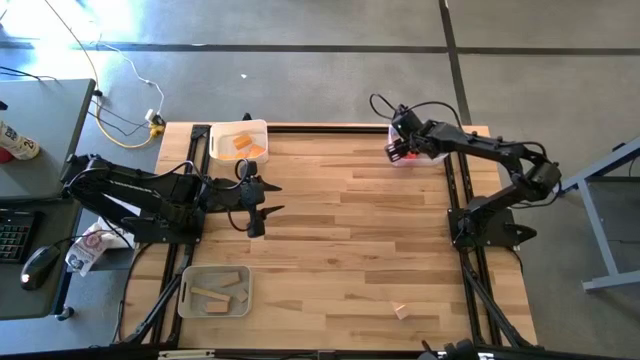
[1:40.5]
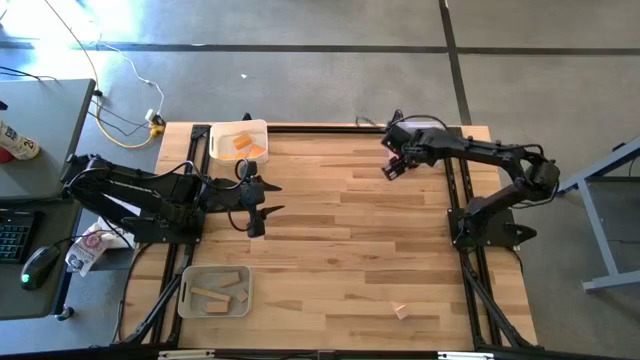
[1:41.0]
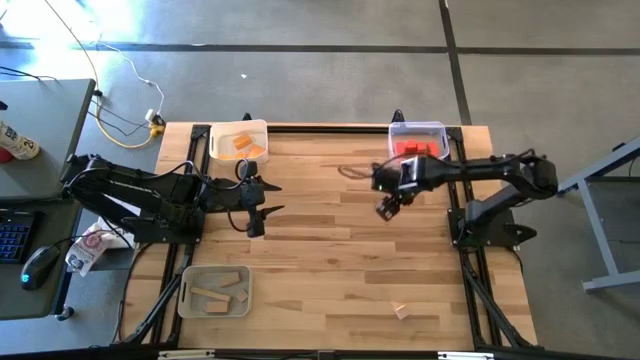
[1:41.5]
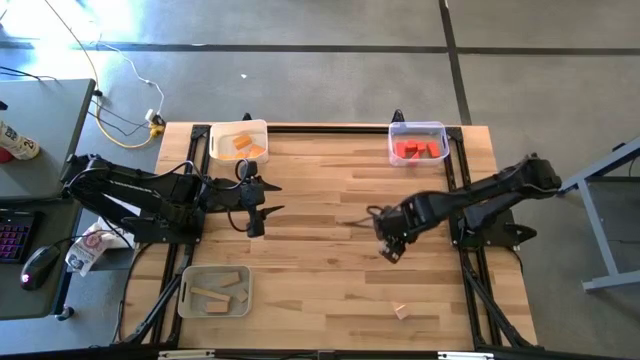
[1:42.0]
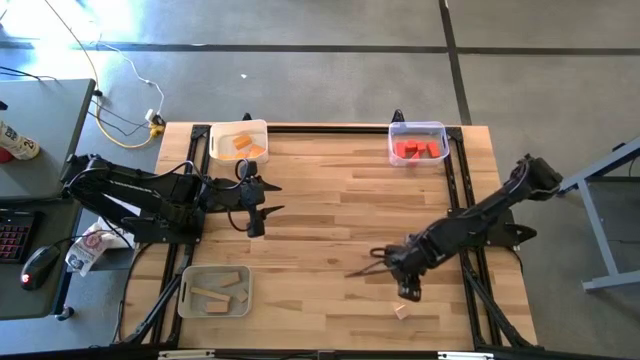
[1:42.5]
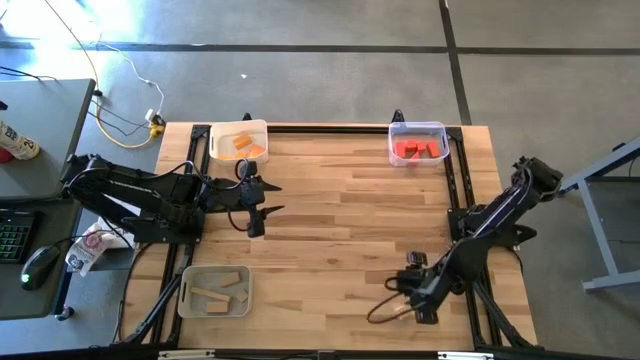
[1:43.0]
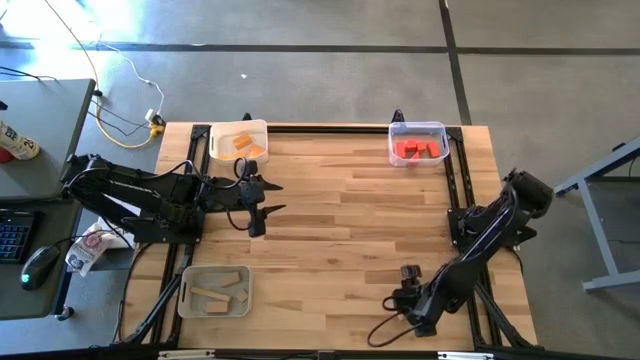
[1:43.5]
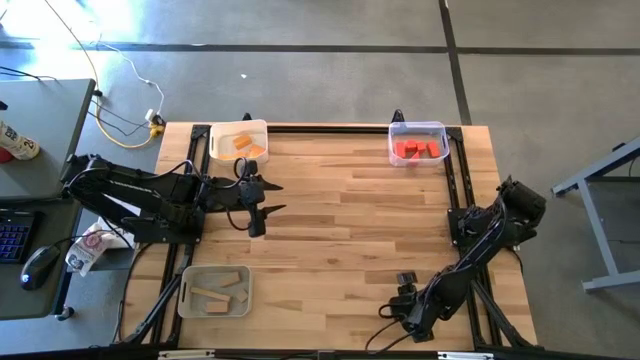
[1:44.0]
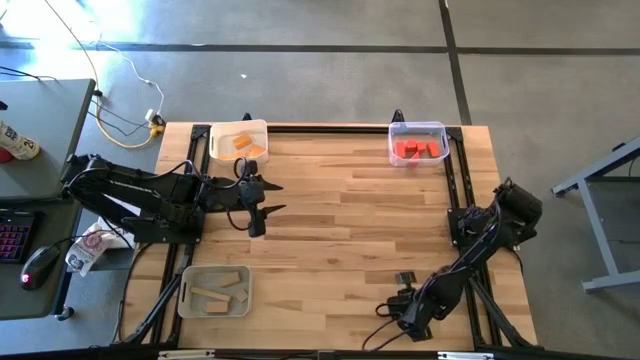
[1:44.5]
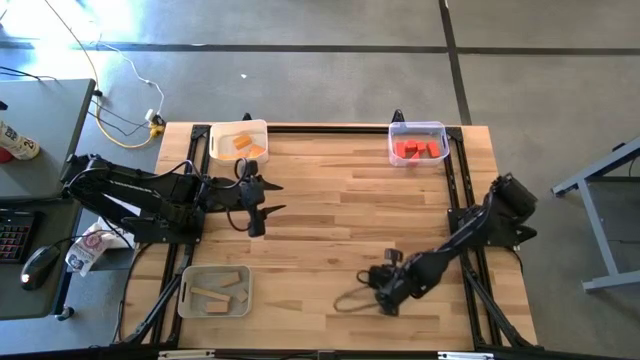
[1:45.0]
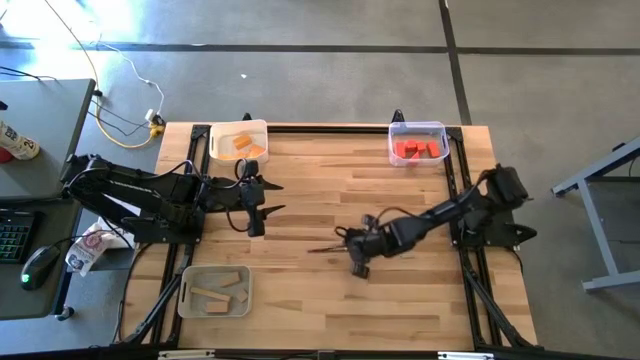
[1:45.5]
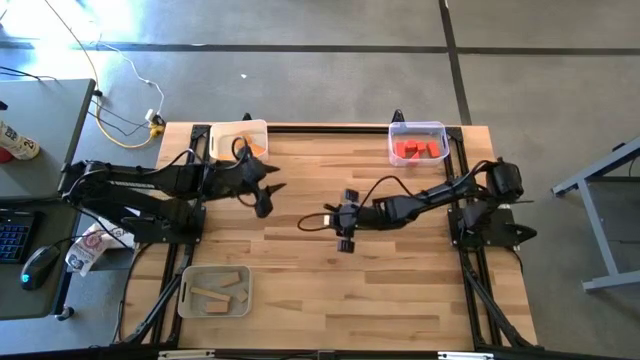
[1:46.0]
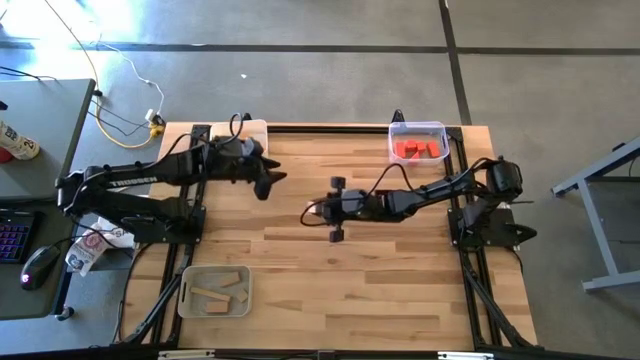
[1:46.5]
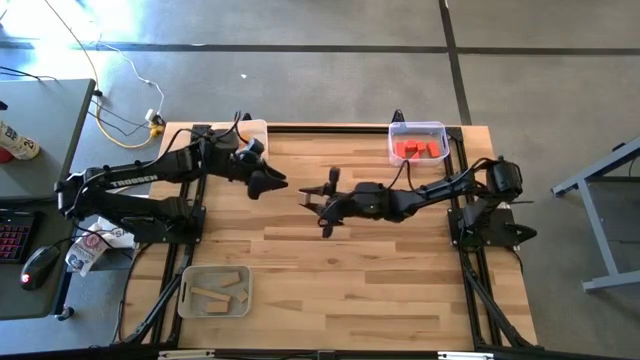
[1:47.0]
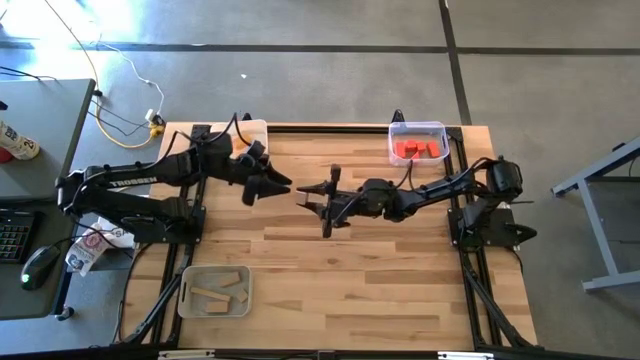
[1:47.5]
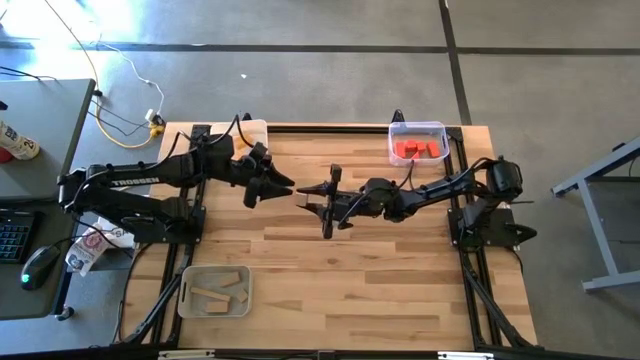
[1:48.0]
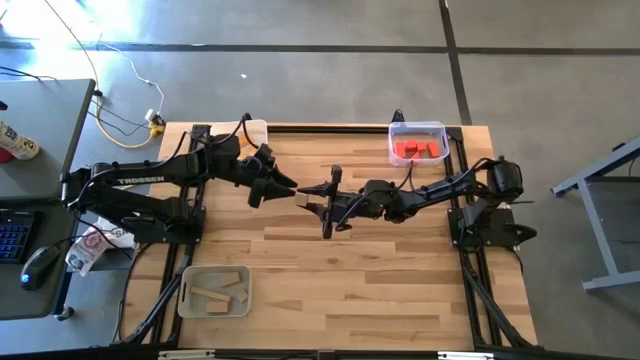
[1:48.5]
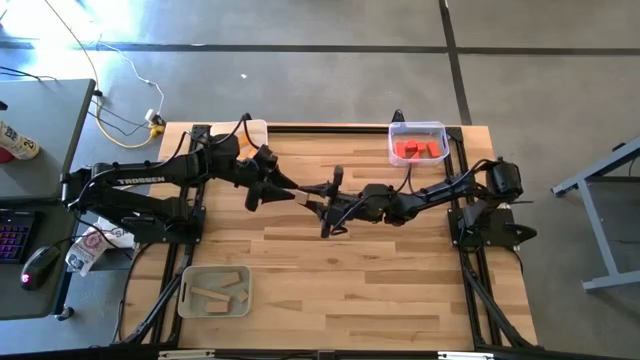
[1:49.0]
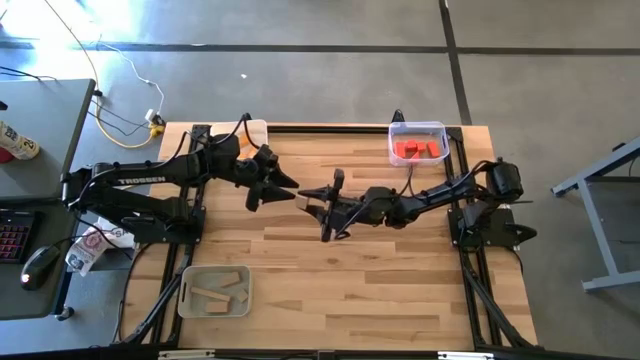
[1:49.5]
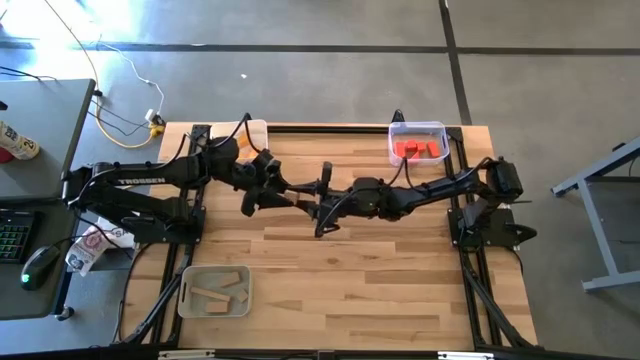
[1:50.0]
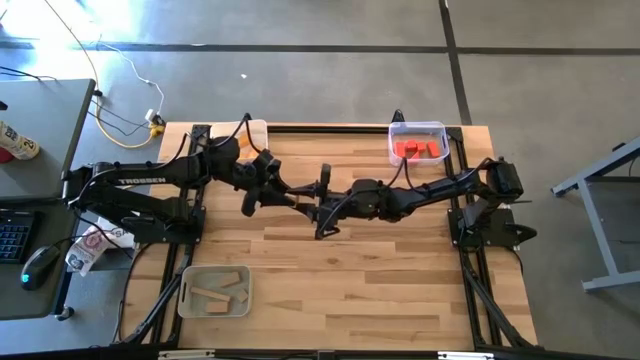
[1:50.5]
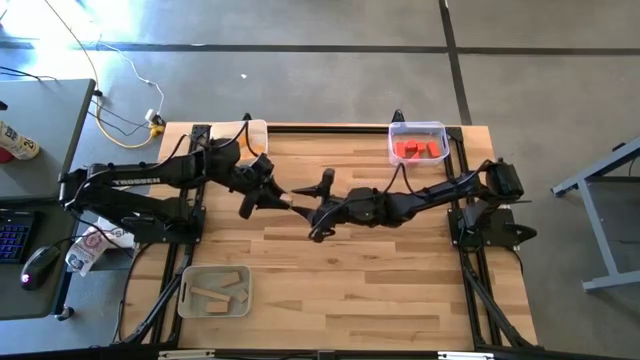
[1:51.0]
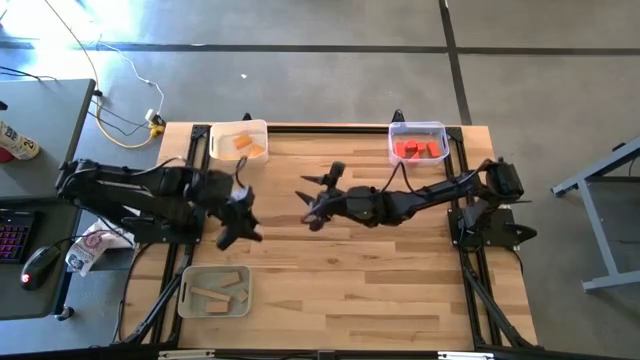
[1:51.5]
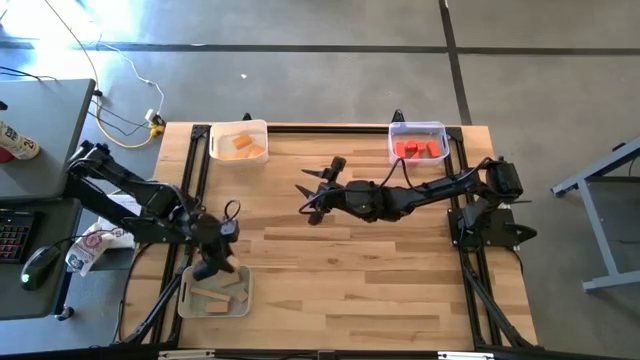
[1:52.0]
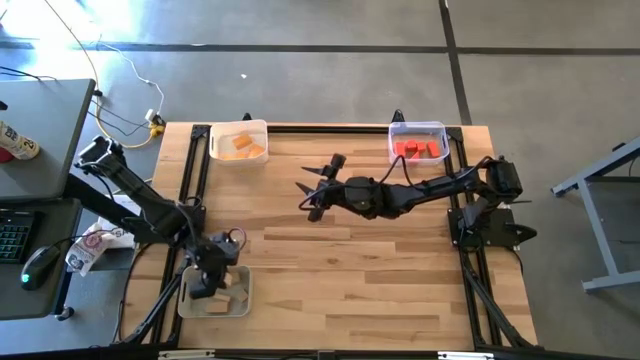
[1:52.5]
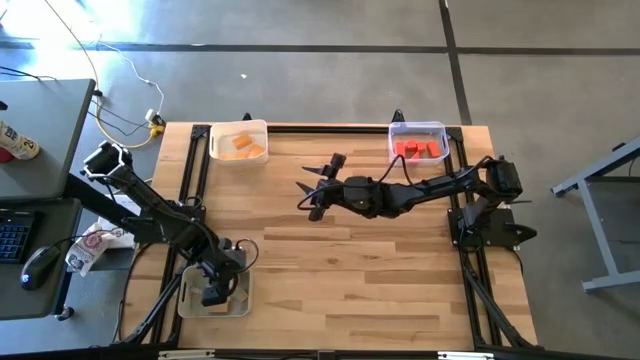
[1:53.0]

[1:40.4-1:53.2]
Task: Sort & place blocks by color
Put the brown block into the gray bin

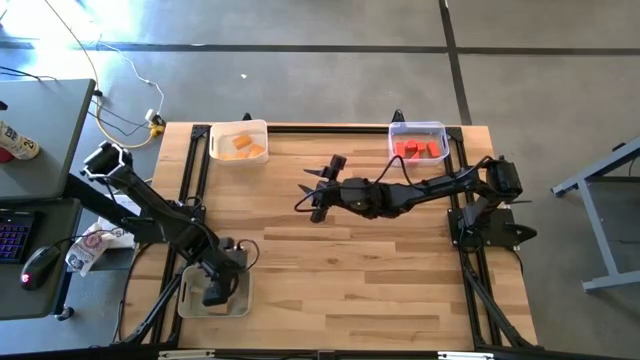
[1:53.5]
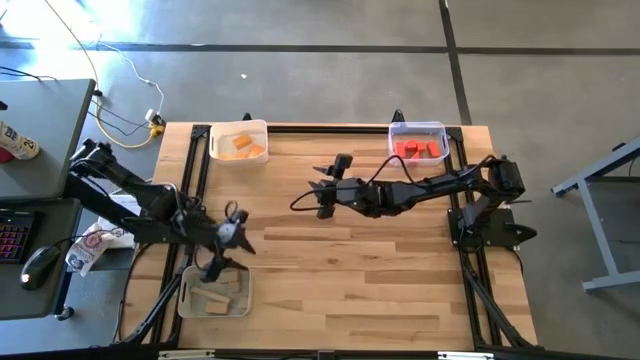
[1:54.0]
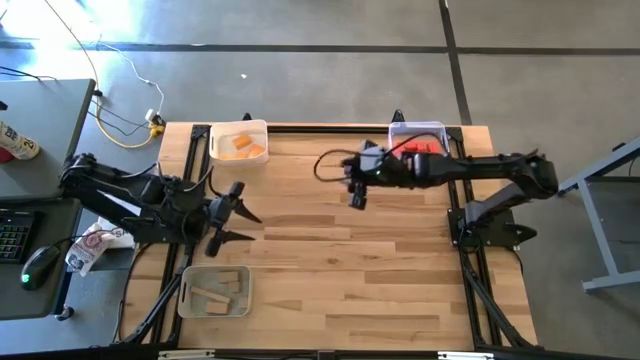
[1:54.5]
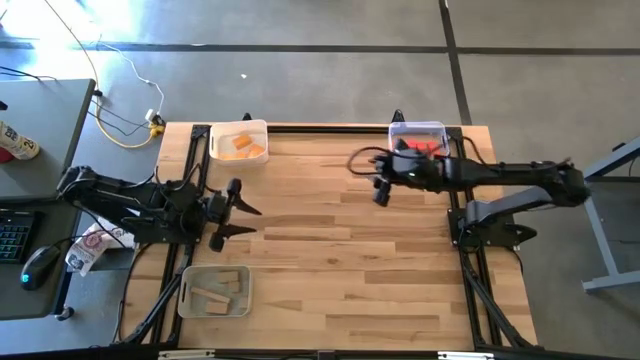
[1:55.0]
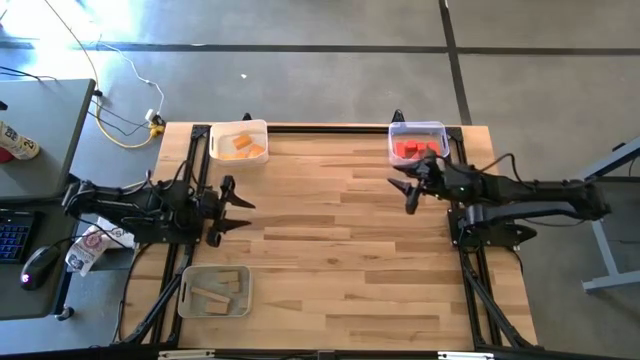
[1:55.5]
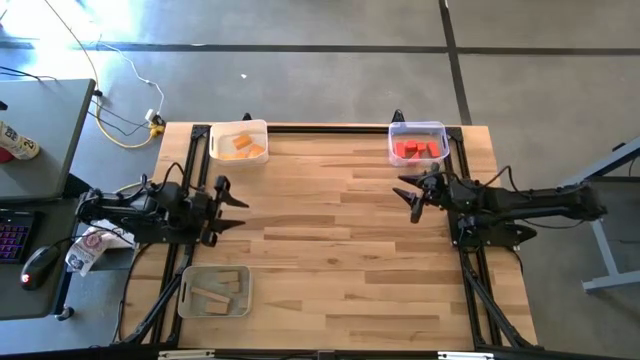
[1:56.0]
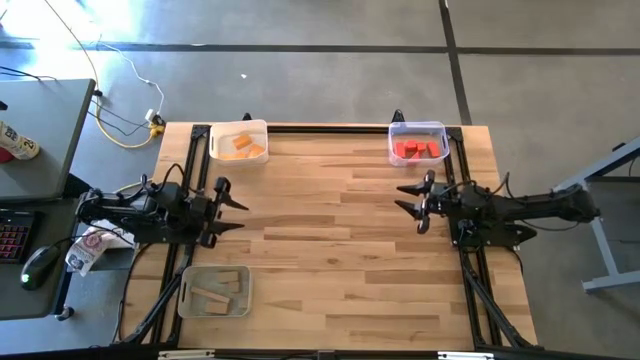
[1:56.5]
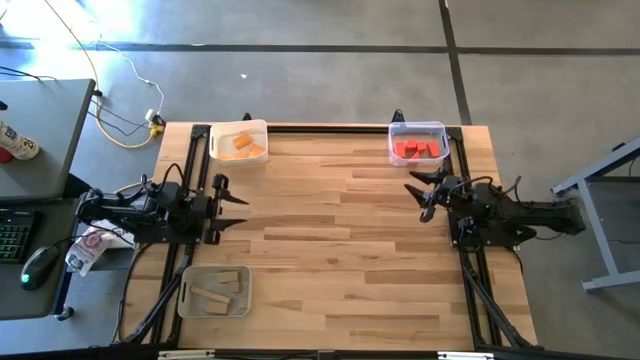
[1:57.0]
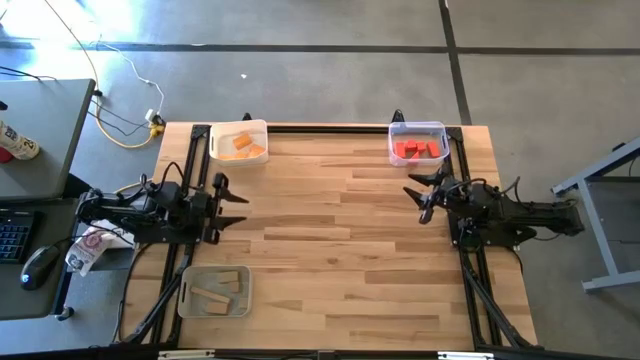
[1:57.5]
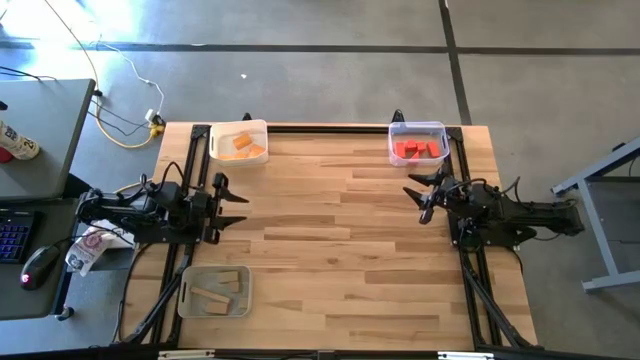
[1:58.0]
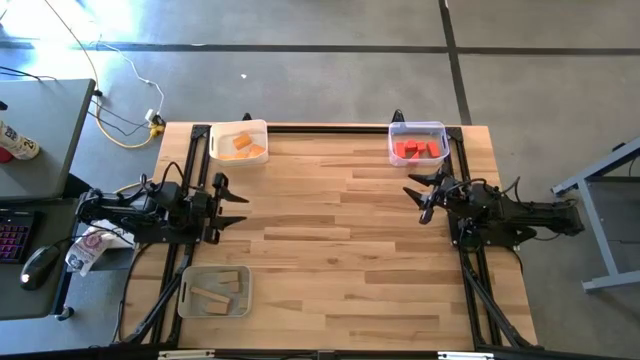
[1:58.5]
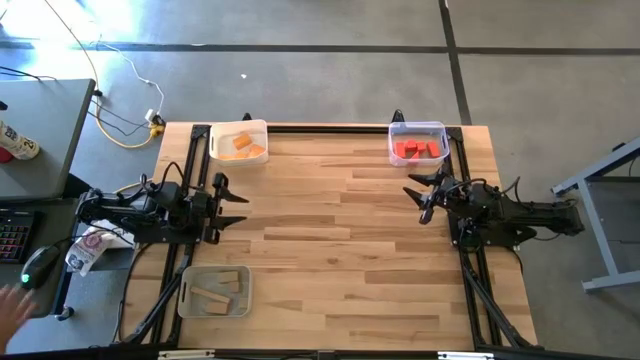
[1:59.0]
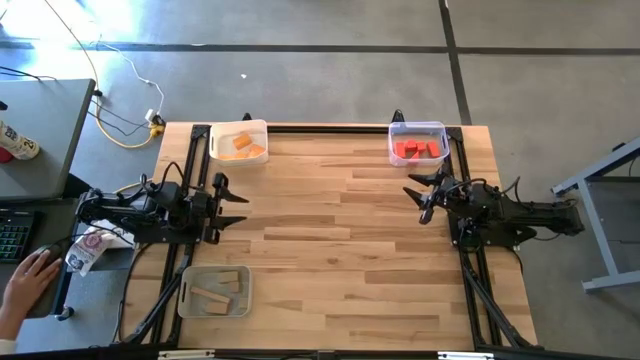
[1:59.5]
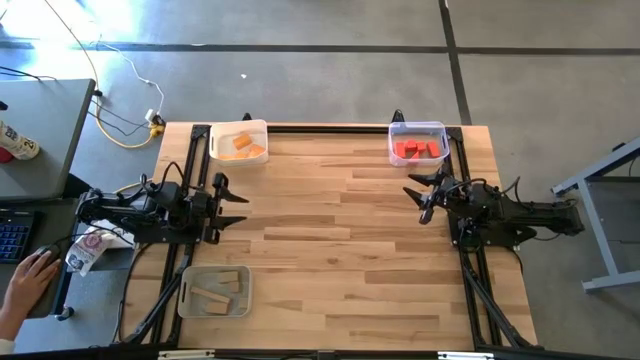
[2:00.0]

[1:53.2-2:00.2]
Return to Home Position

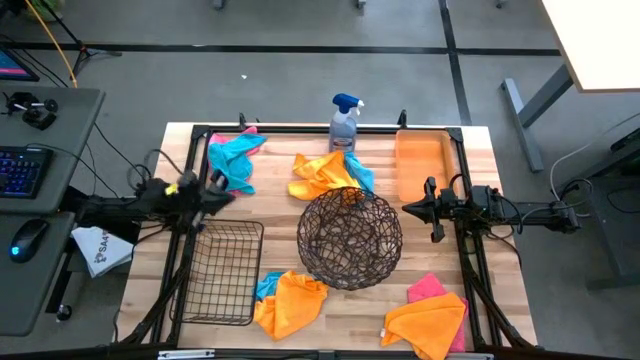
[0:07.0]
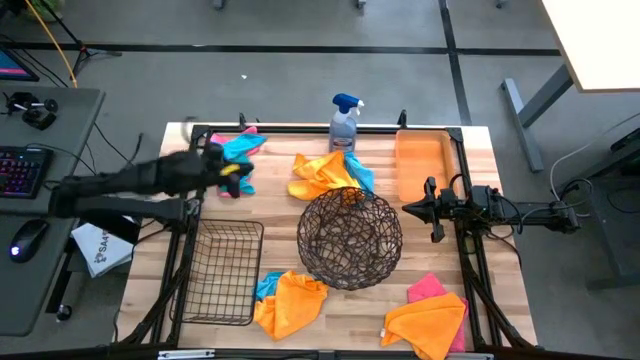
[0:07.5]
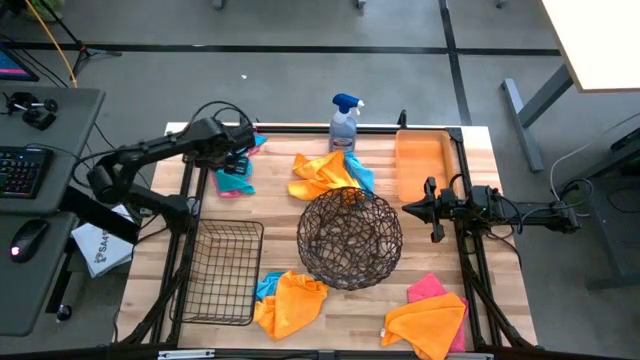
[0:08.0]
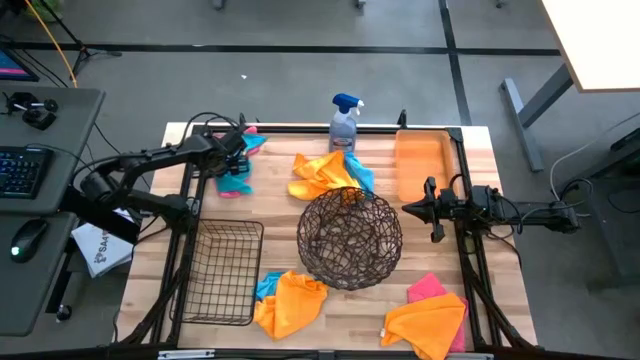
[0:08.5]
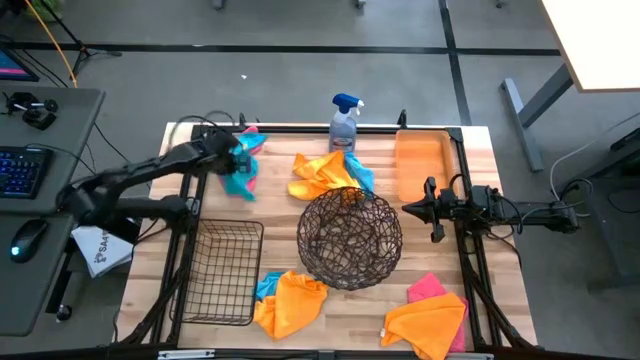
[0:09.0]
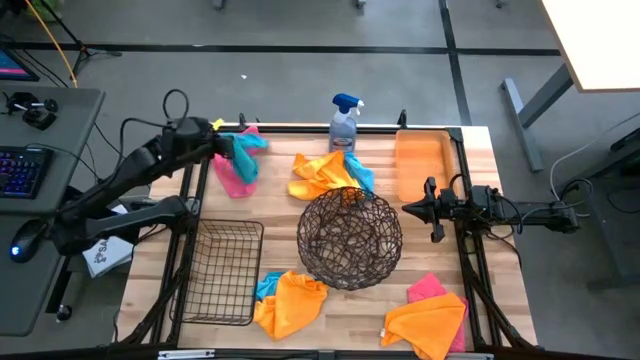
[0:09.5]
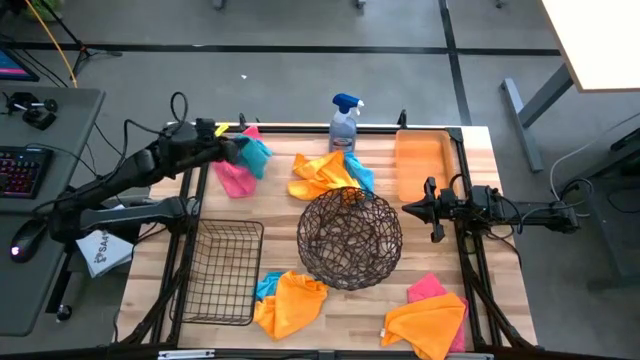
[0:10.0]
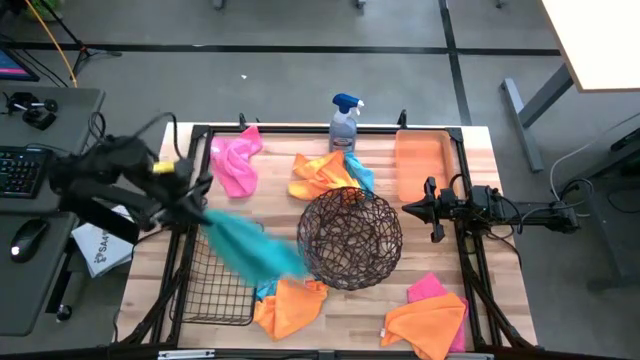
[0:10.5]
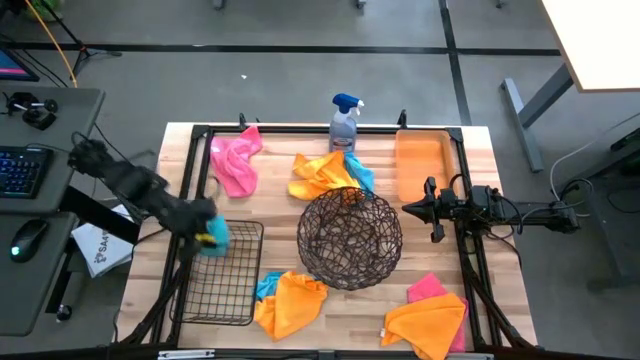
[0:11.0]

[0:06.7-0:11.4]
Task: Sort microfiber towel by color & place in baskets
Put the top left blue microfiber towel into the wire basket
